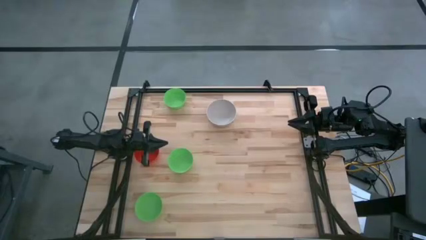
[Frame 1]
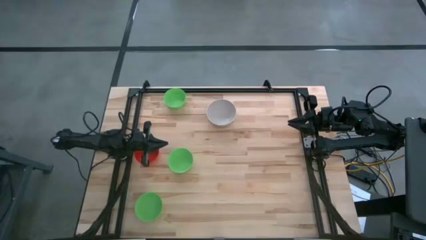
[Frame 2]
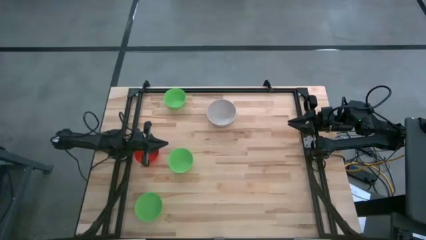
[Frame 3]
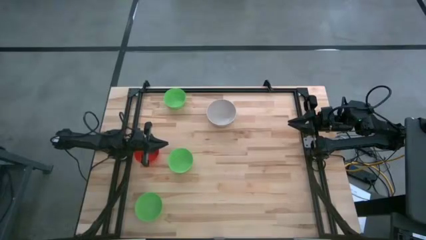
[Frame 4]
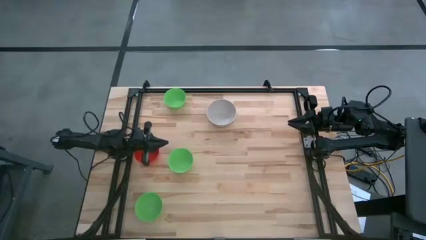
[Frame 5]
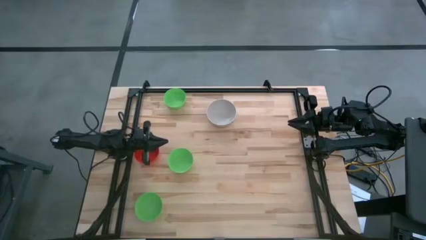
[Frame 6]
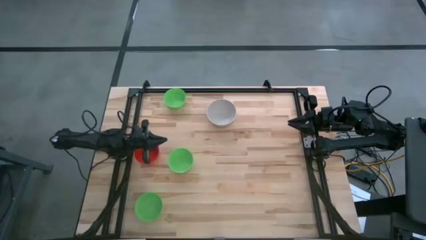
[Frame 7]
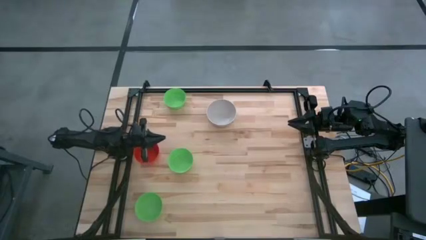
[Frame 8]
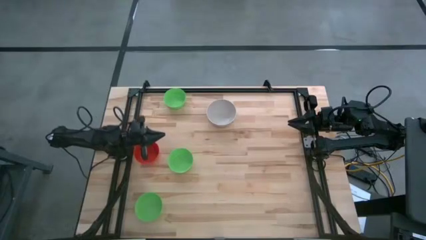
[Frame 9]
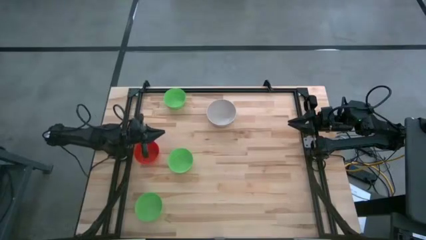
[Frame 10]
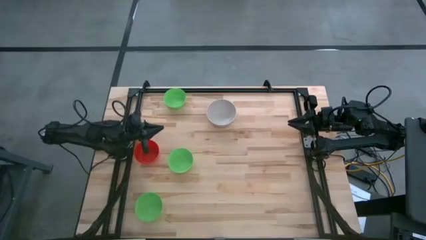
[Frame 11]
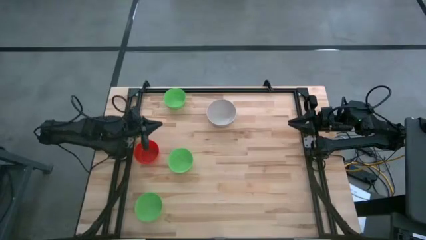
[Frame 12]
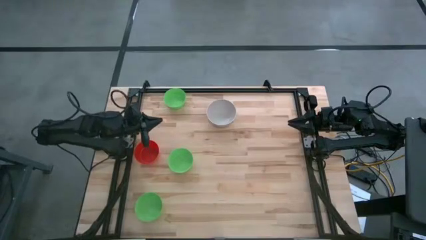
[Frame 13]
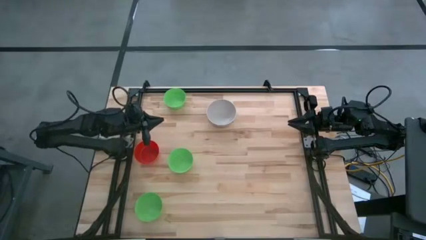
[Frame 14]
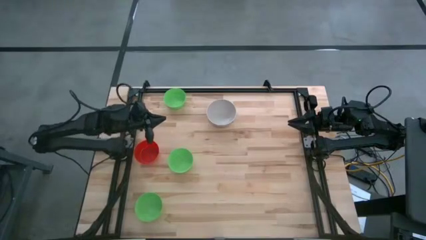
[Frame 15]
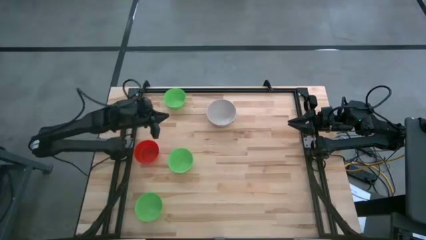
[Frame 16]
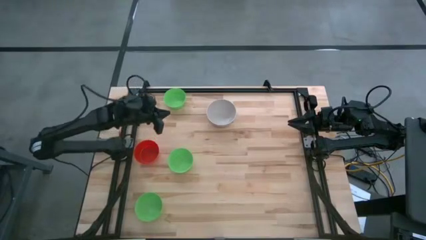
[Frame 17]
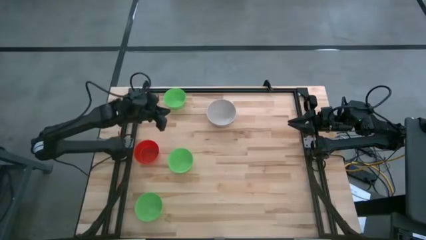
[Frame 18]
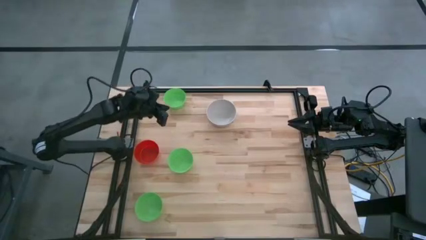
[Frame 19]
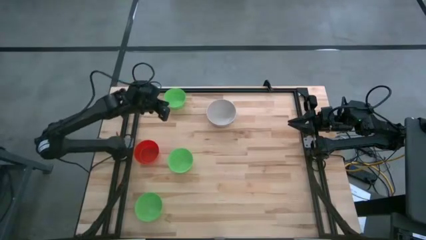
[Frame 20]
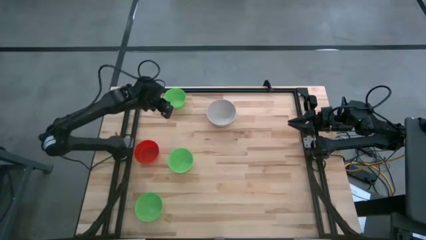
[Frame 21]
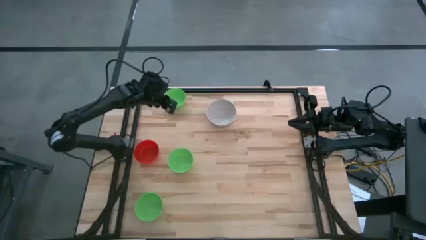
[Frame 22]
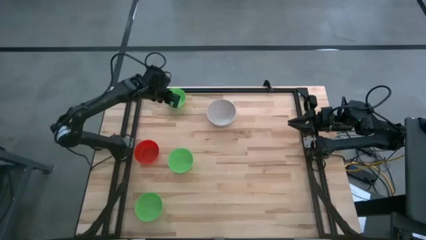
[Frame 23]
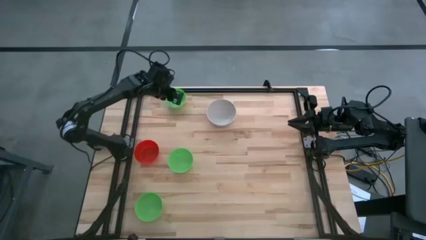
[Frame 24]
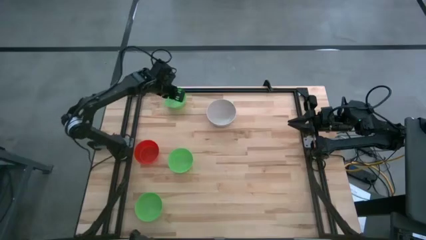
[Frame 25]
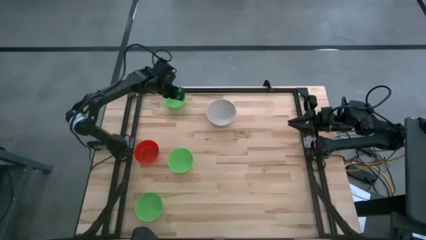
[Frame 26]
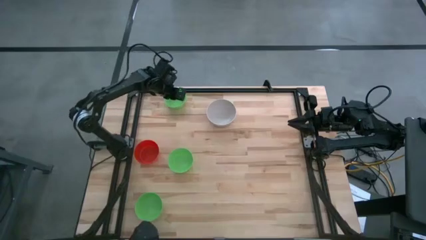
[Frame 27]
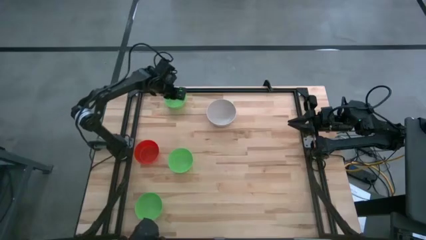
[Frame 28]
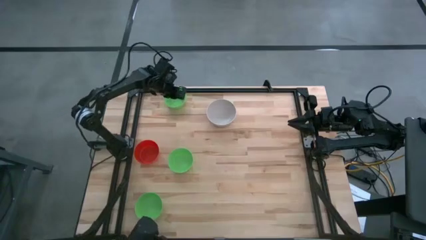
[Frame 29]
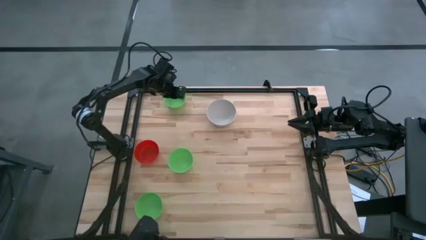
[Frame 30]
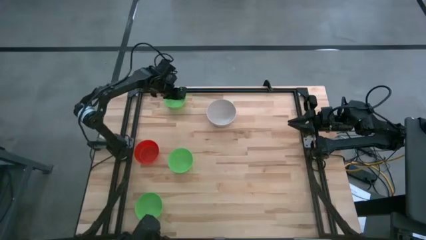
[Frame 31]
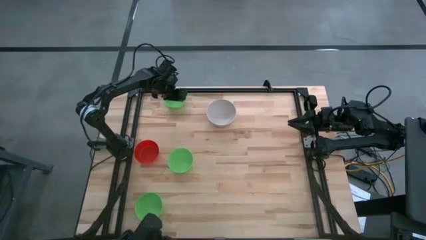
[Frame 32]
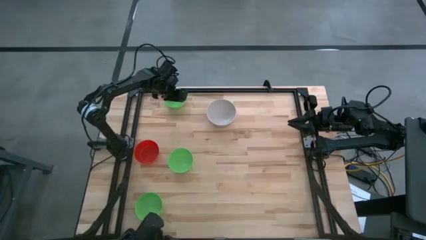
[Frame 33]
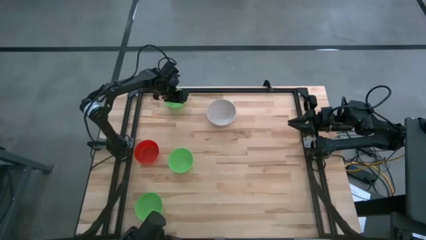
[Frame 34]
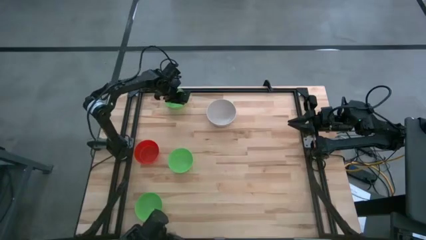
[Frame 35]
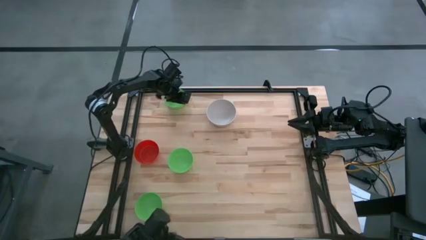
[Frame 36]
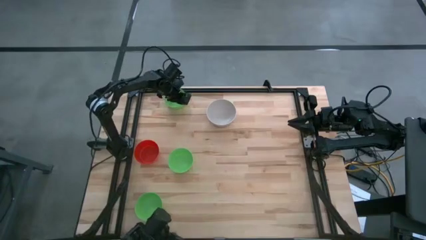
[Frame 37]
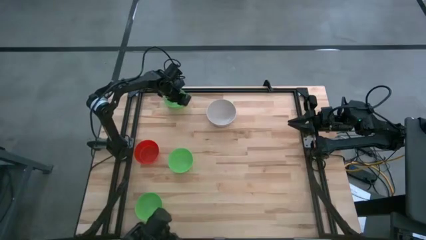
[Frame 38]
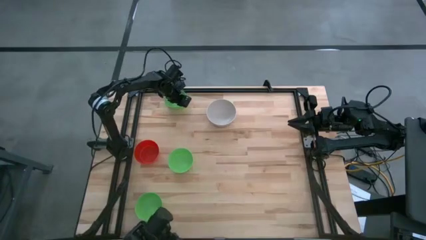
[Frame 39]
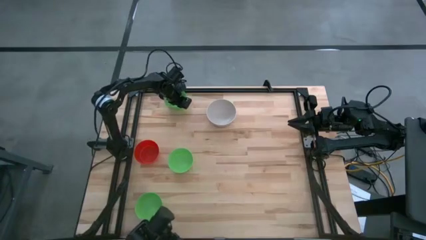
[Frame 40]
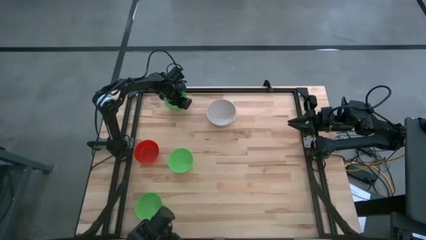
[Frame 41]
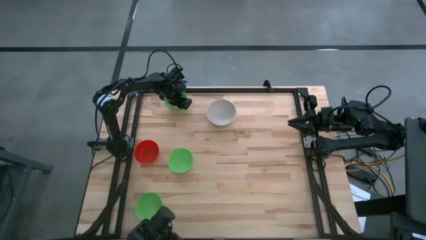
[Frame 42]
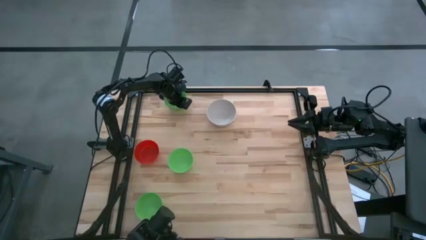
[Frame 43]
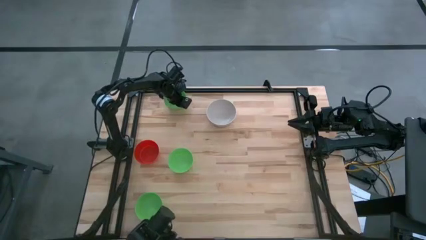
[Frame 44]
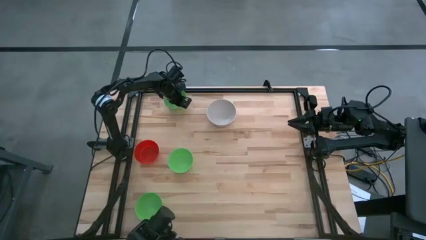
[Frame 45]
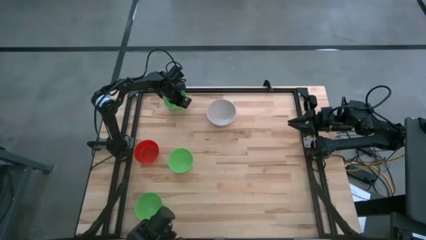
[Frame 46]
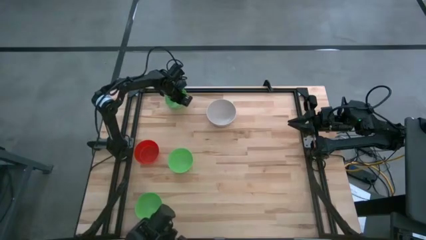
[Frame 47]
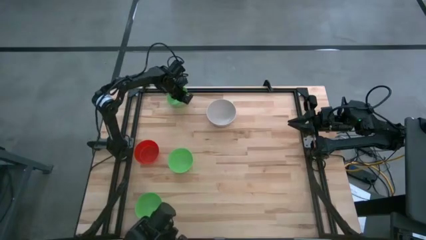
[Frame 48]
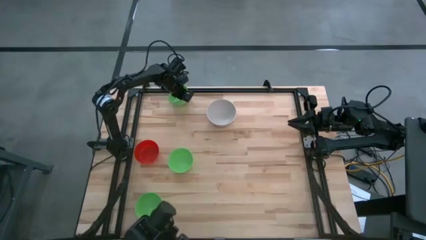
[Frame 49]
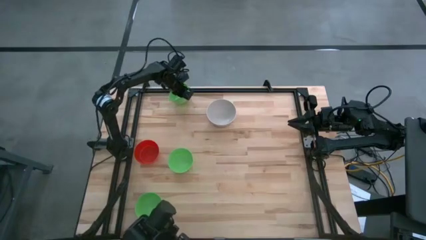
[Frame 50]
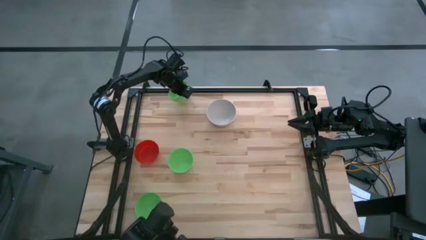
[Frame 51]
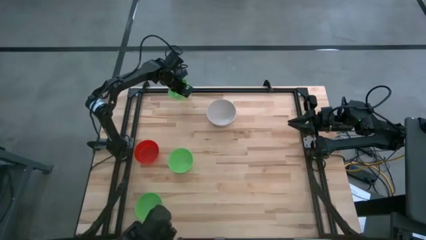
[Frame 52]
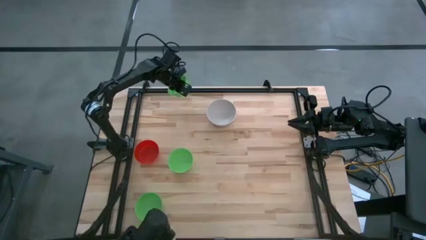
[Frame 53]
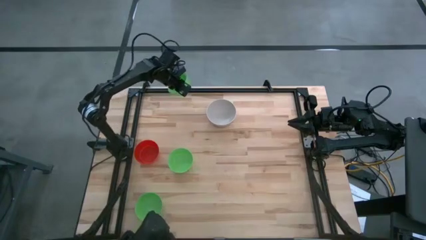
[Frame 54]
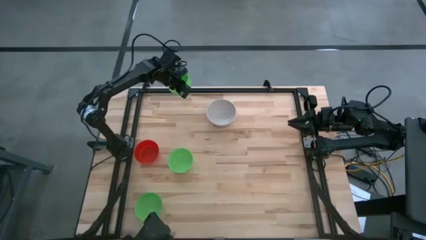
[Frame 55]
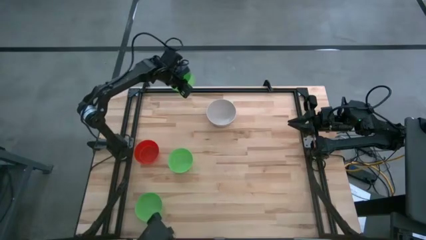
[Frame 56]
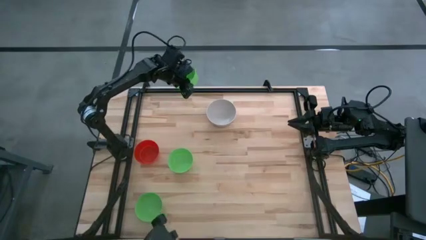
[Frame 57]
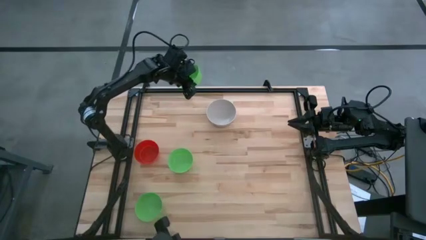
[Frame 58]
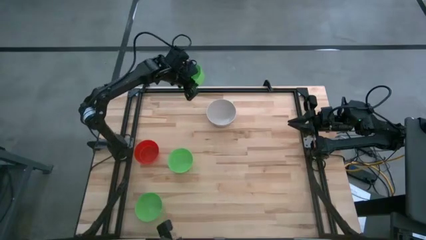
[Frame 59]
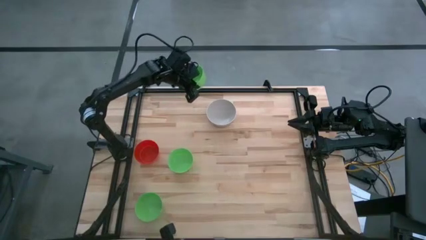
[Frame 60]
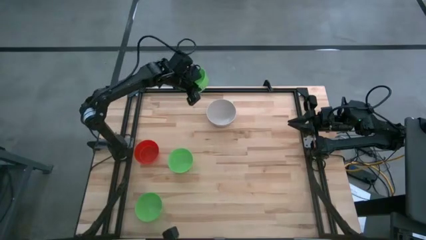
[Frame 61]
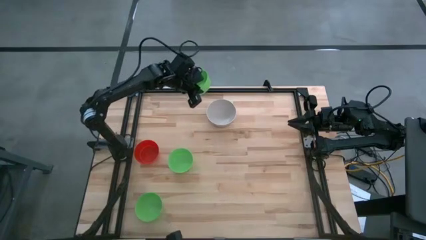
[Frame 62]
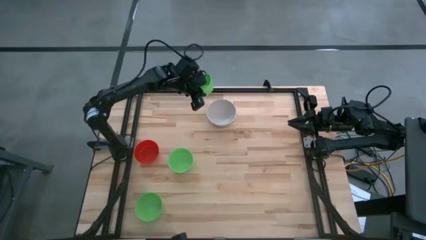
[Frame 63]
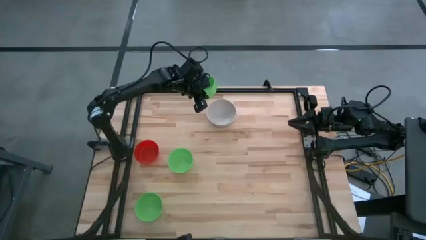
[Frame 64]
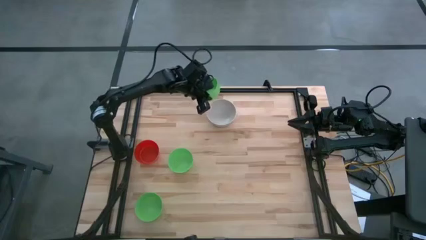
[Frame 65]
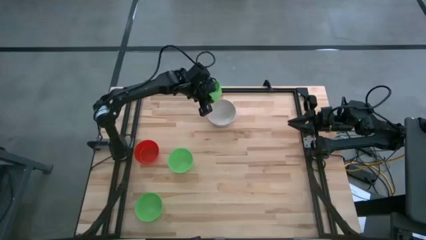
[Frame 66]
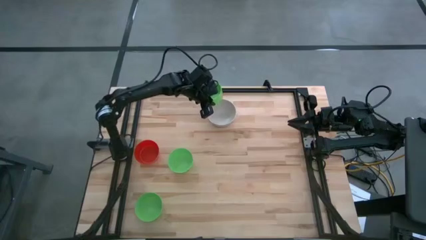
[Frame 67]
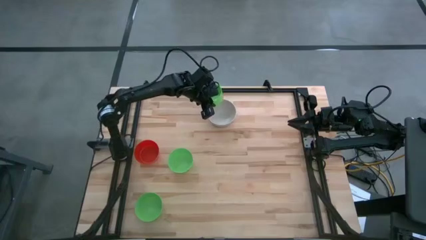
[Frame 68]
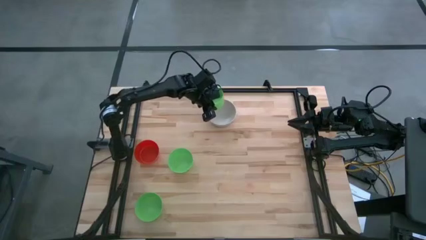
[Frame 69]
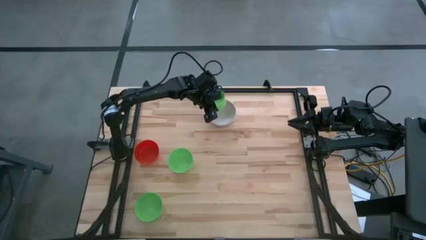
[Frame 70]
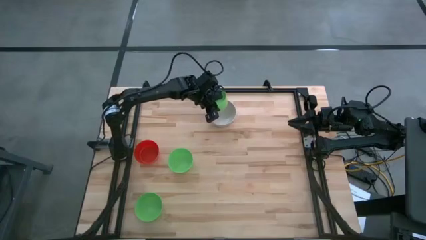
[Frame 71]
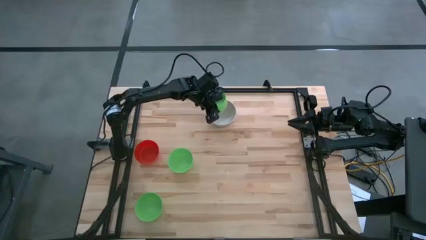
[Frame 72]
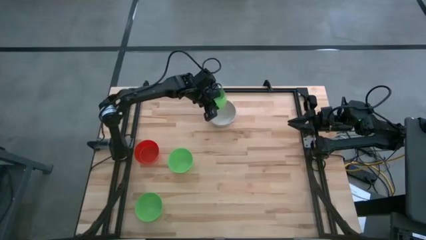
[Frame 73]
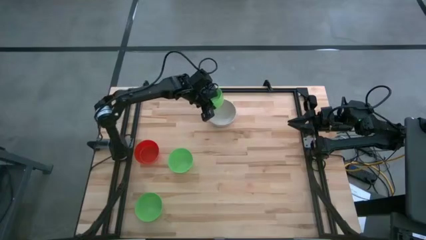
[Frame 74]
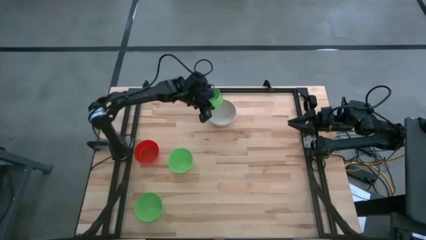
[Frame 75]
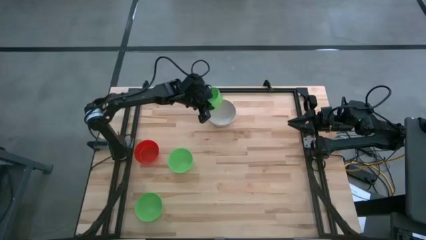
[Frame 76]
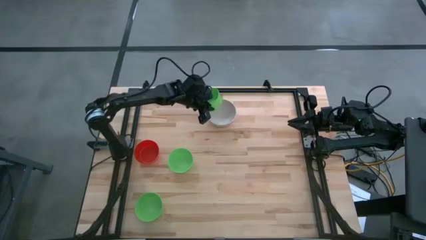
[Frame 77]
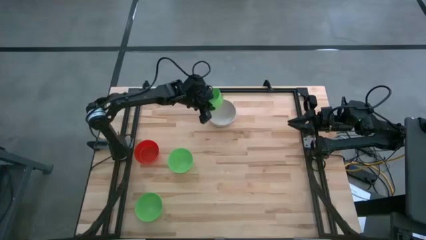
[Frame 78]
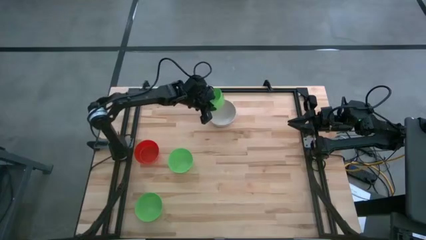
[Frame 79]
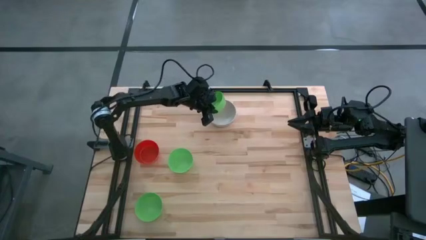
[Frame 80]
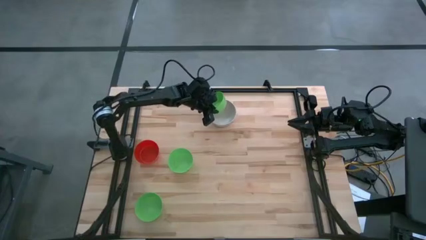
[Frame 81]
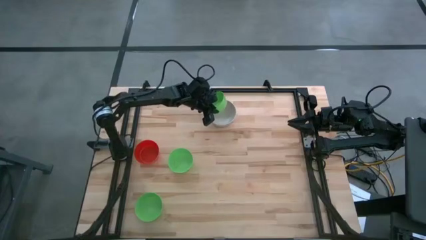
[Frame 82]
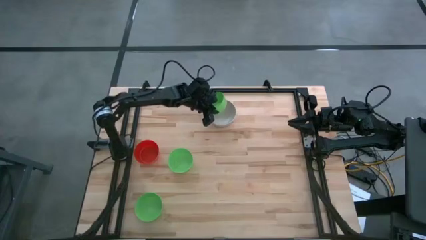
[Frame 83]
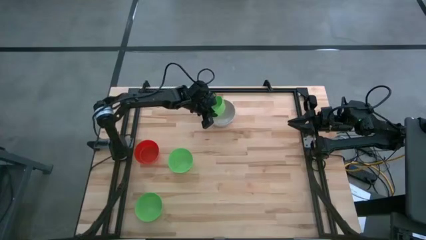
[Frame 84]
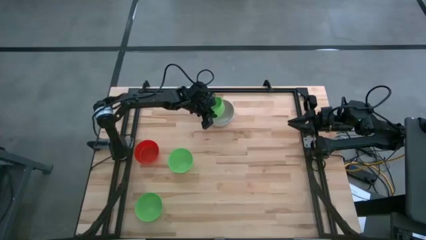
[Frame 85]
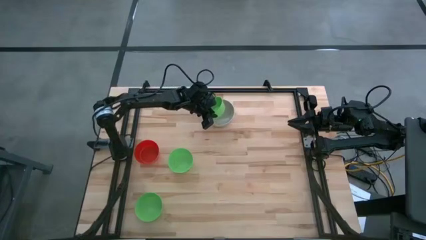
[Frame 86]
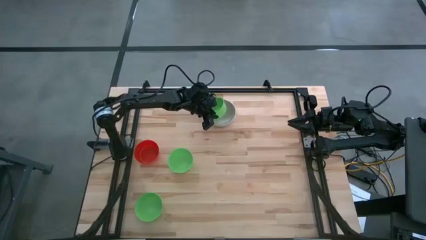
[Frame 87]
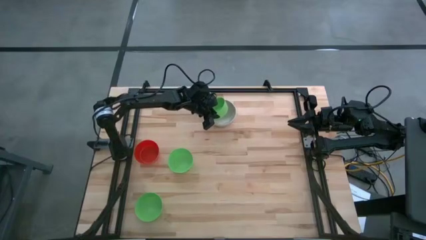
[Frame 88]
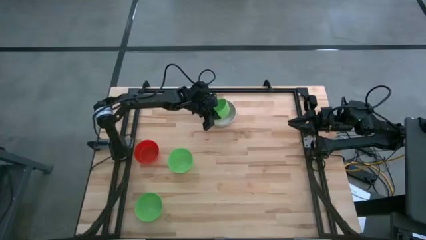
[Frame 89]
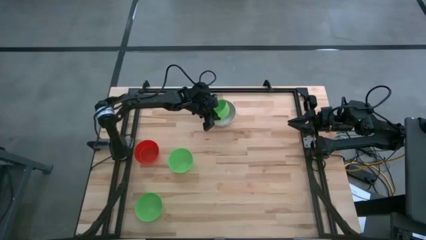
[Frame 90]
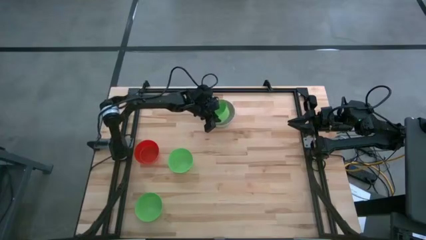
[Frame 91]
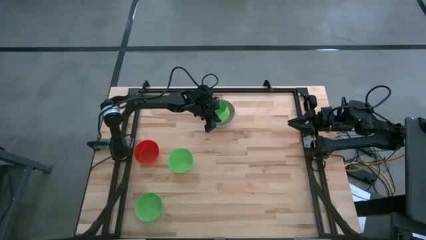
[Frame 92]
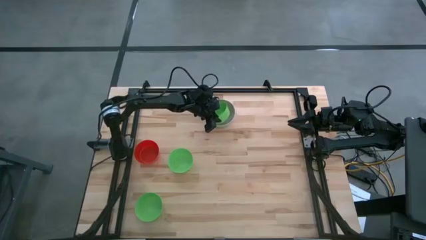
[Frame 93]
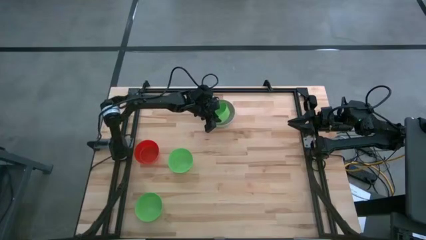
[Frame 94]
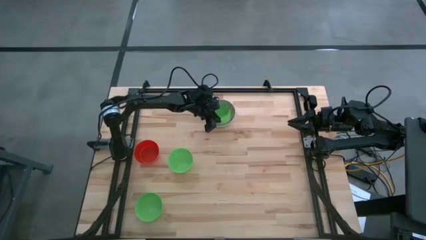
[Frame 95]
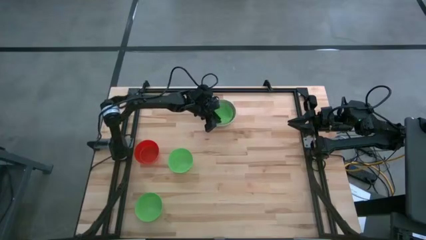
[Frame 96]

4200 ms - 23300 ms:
Stack the top green bowl on the white bowl
